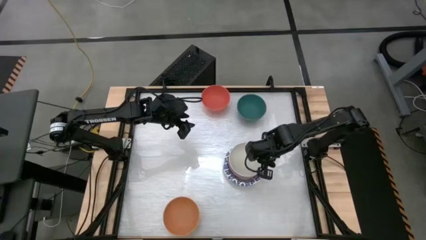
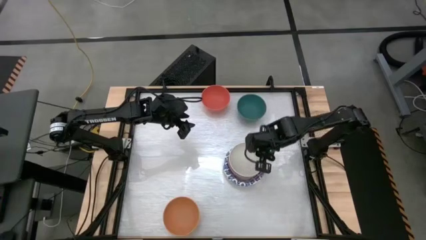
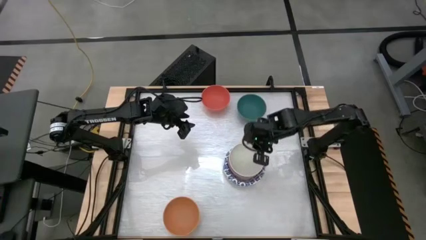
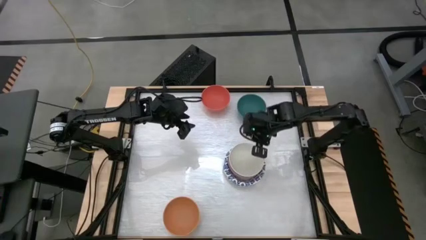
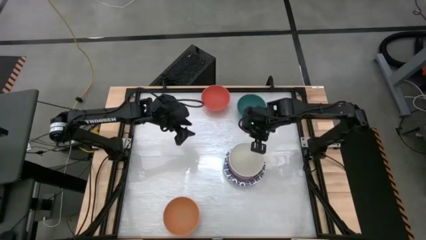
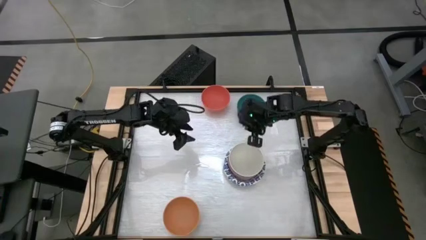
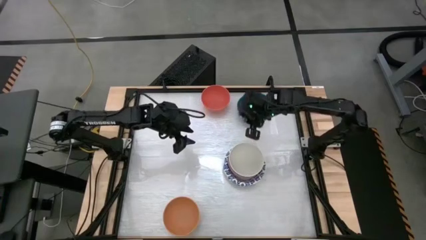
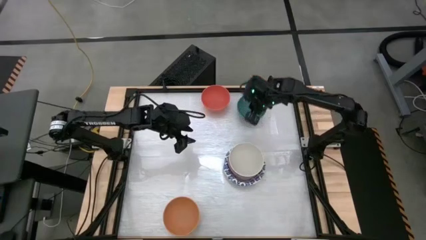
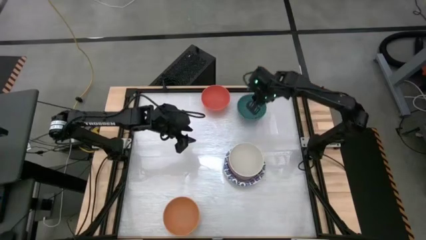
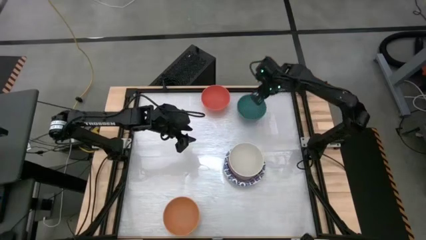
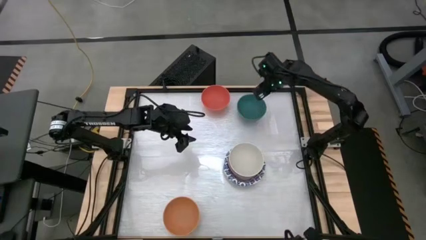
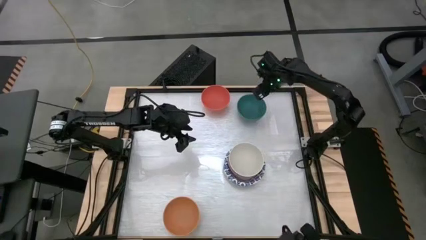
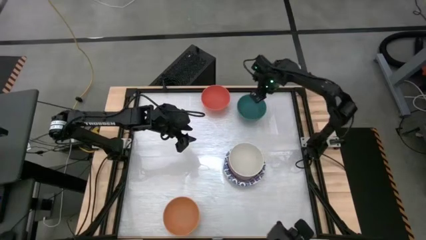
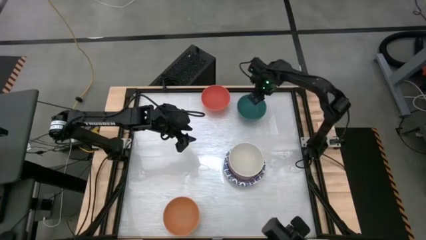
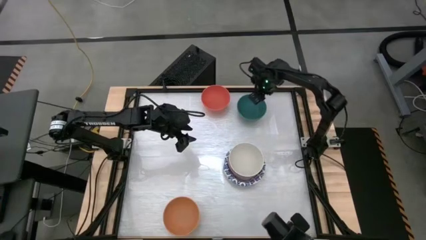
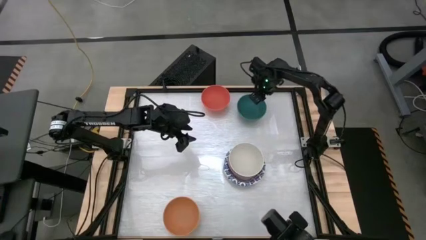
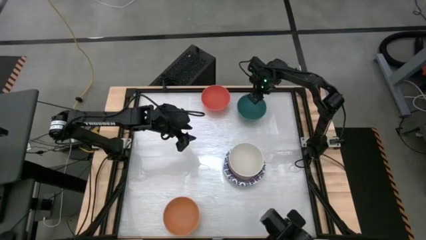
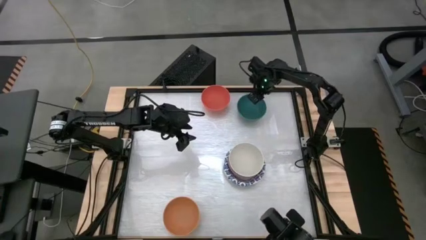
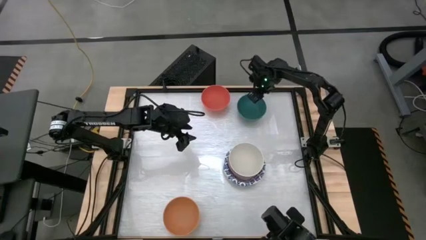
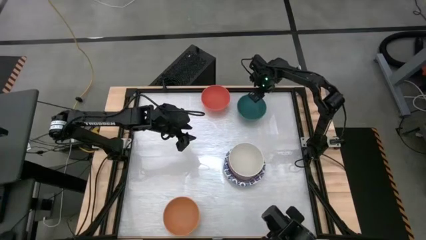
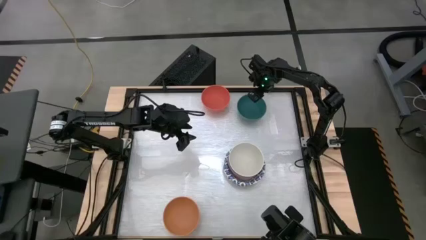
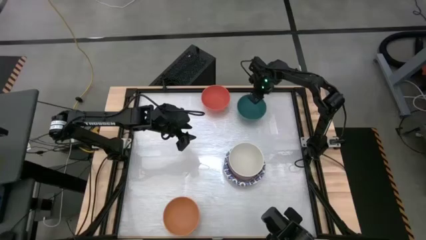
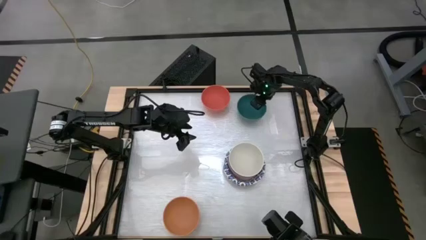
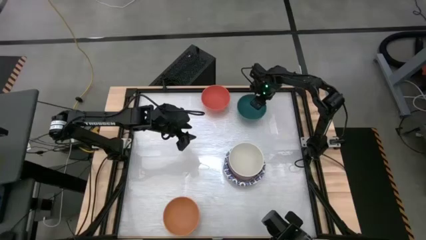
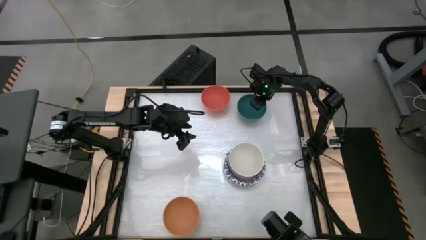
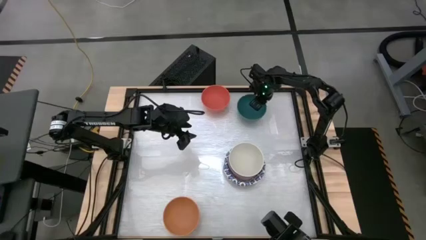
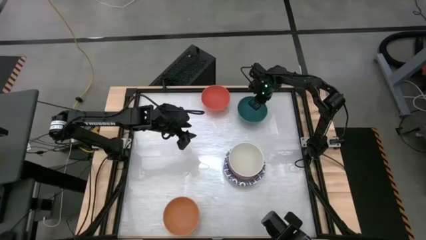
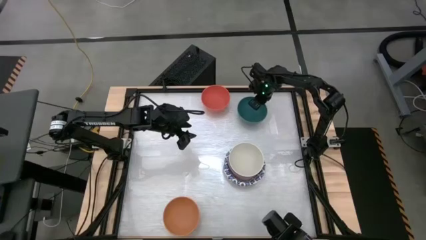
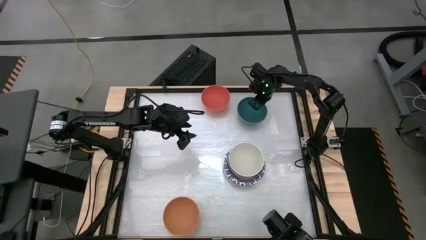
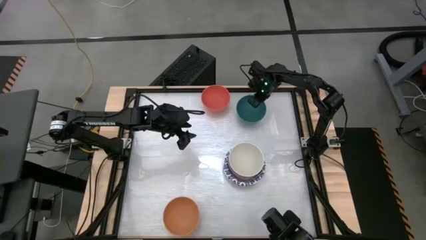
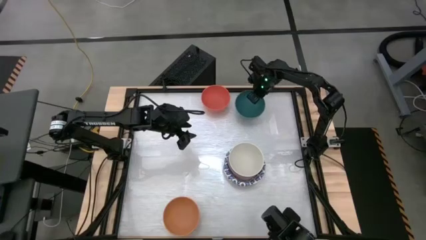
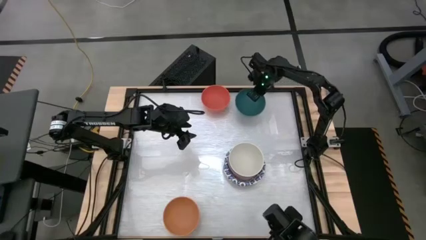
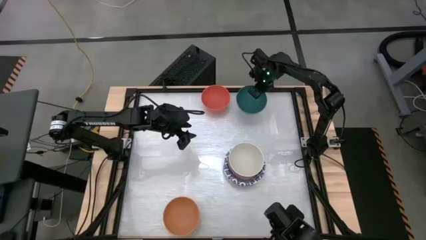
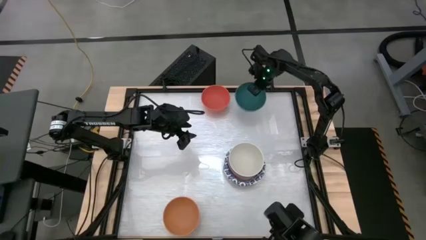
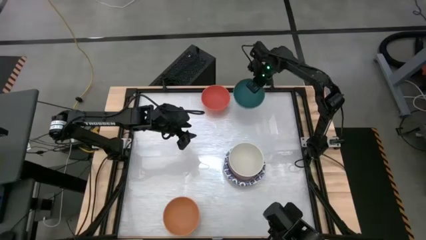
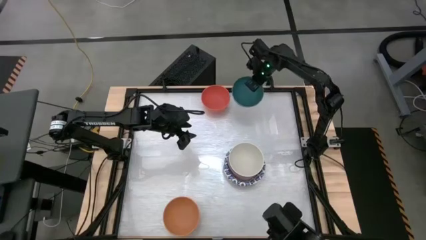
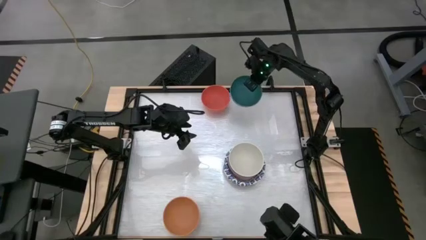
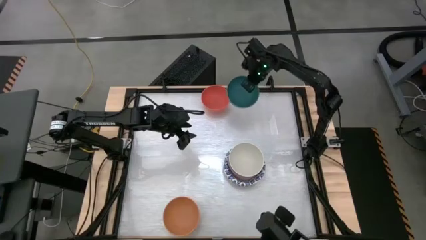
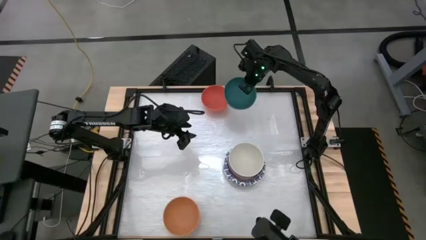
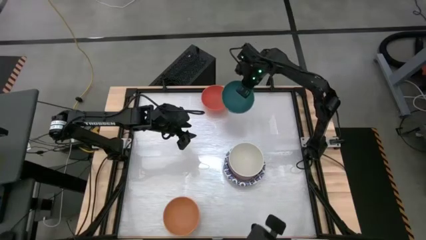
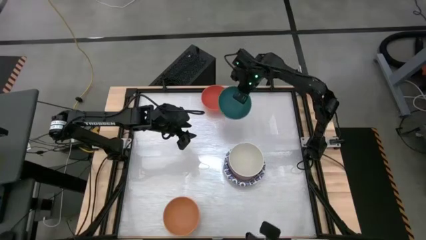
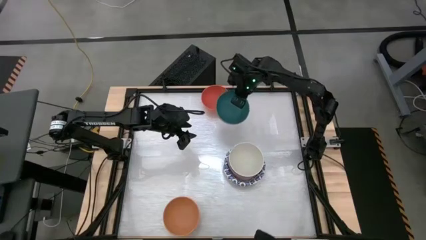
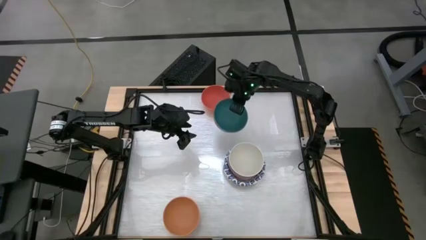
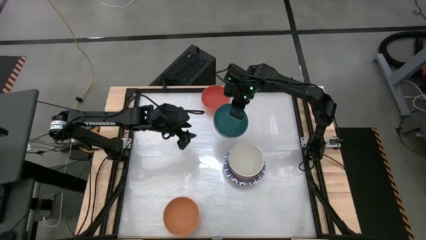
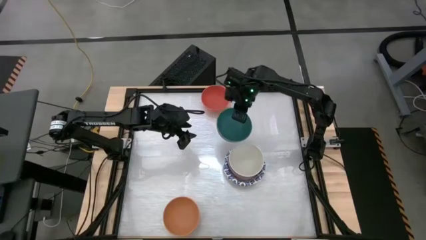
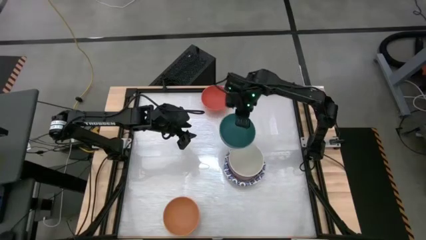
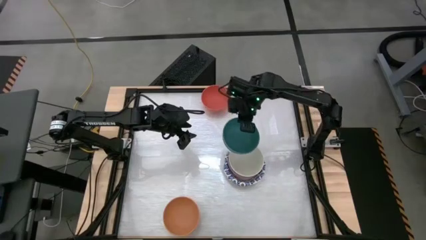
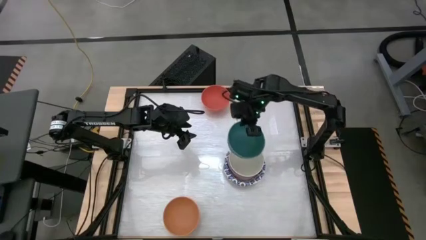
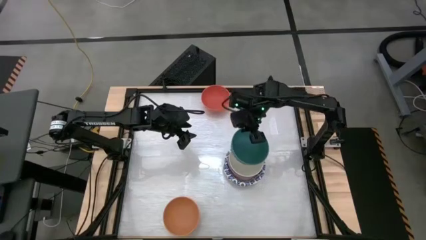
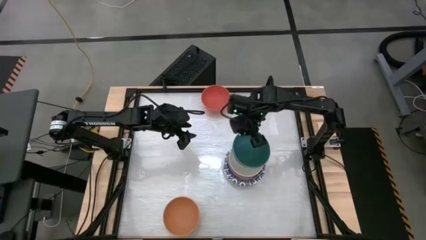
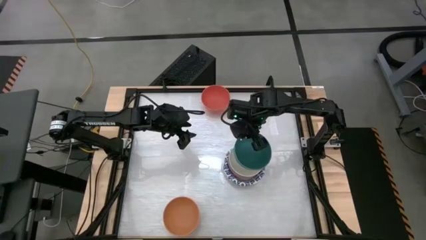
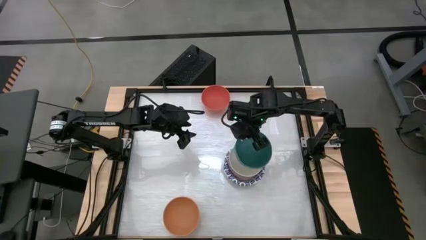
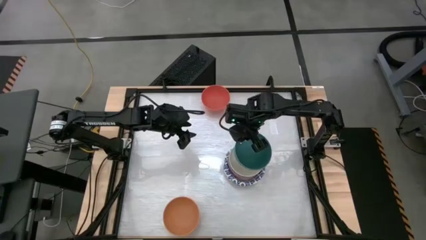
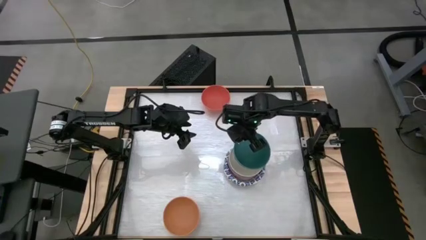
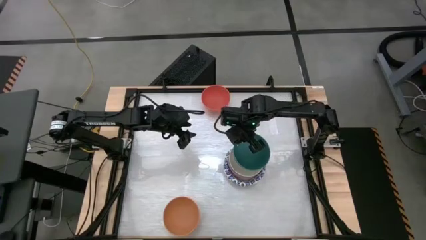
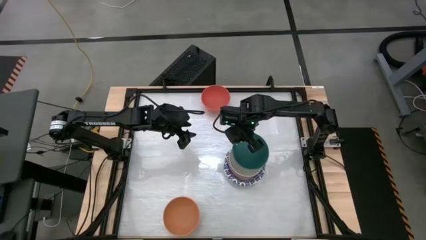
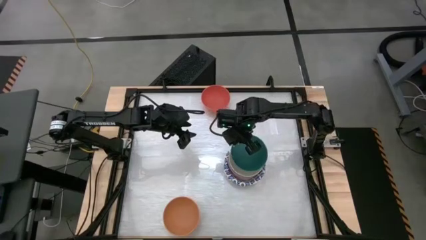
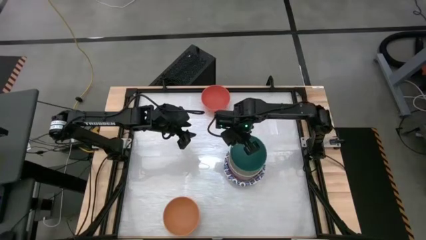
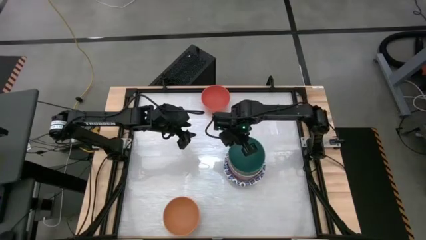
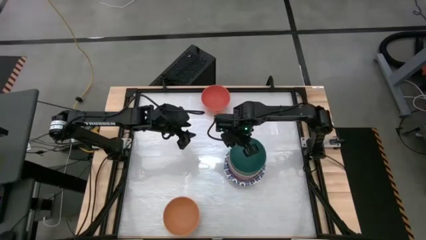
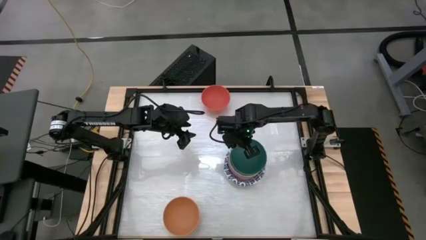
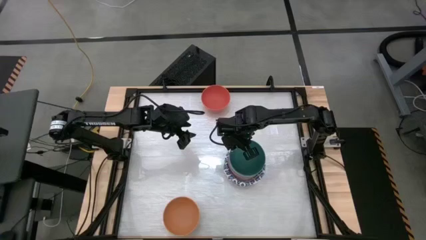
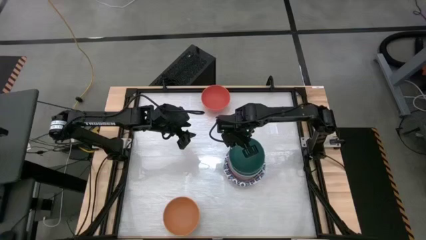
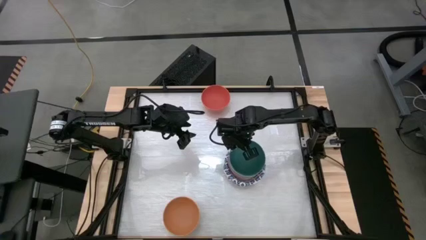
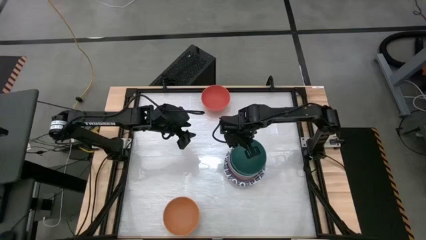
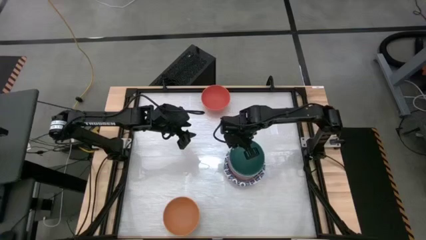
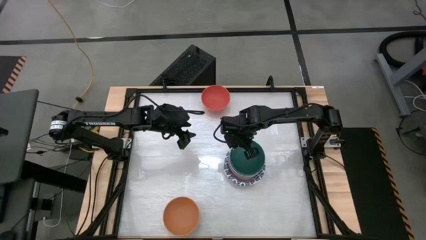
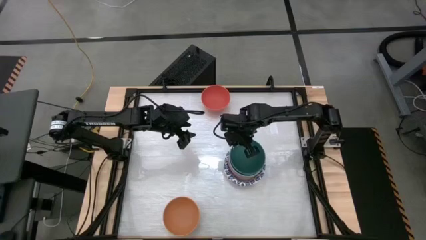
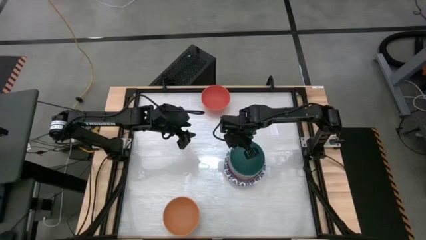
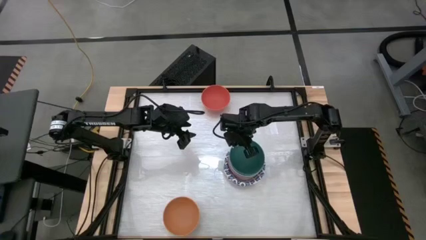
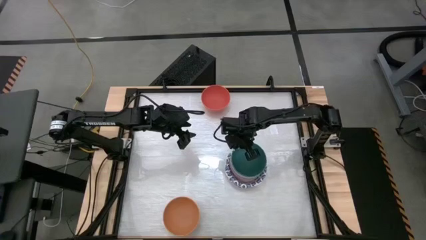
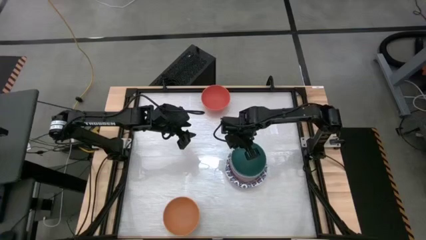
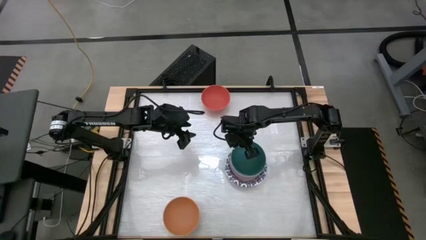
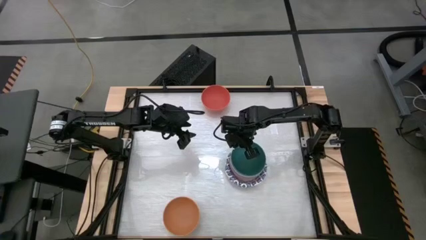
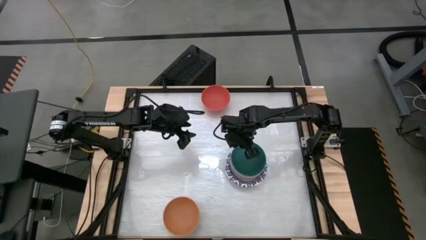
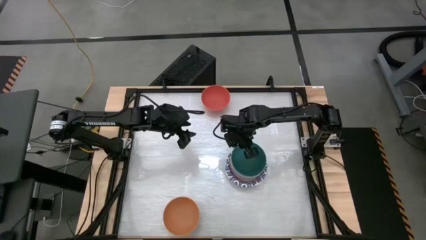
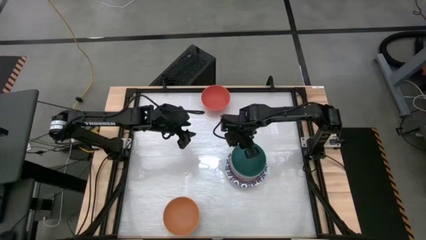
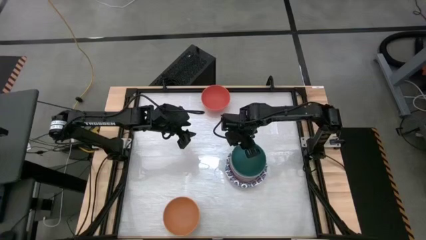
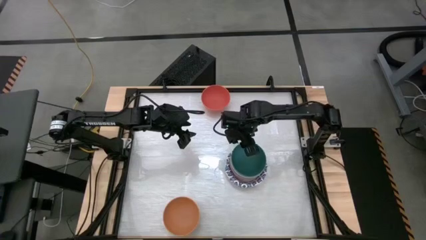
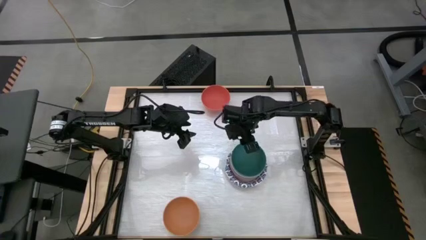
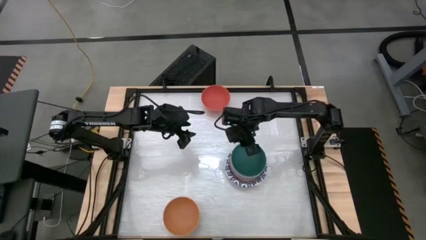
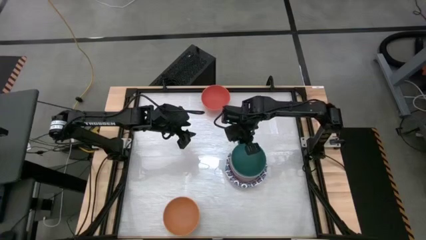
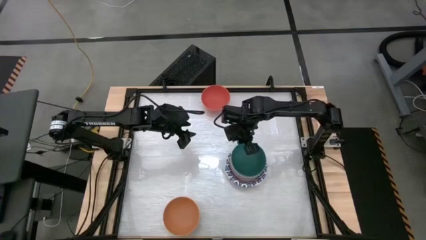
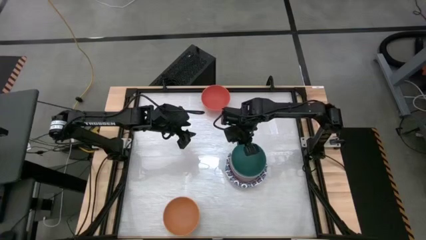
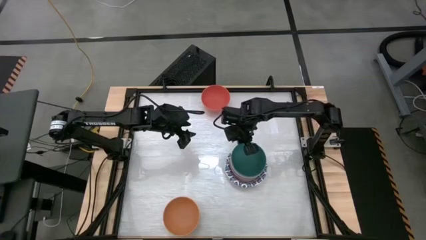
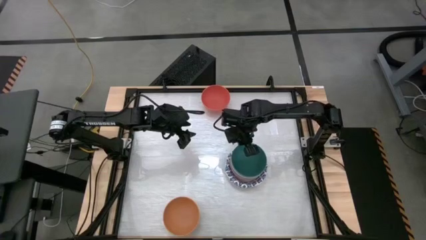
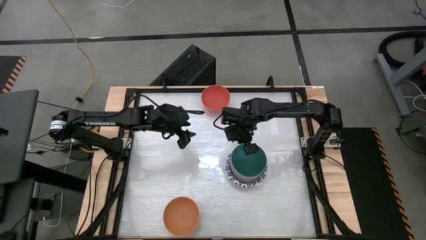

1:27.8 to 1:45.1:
Task: Nest bowls inside each other by size order
Stack the green bowl into the white bowl
